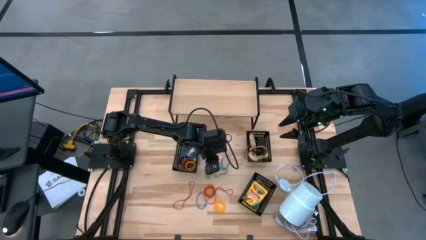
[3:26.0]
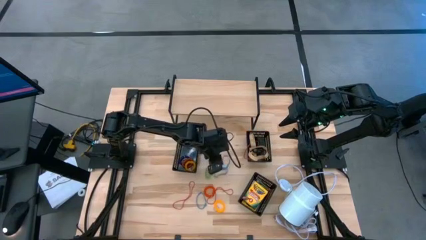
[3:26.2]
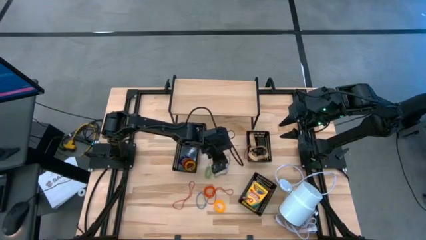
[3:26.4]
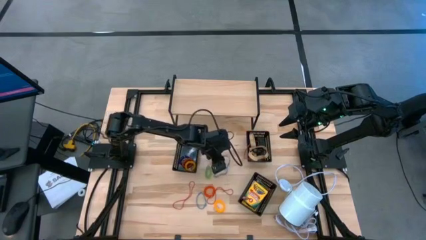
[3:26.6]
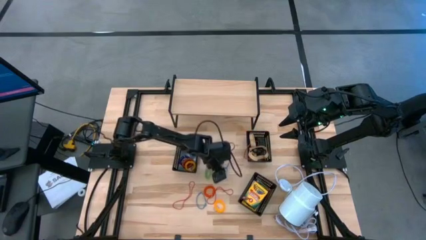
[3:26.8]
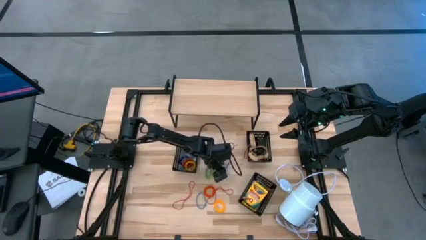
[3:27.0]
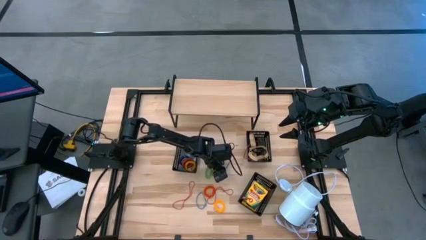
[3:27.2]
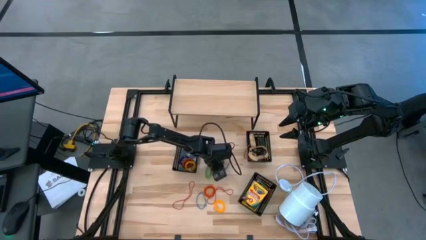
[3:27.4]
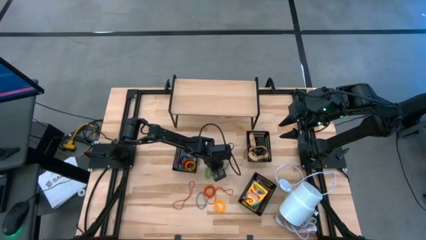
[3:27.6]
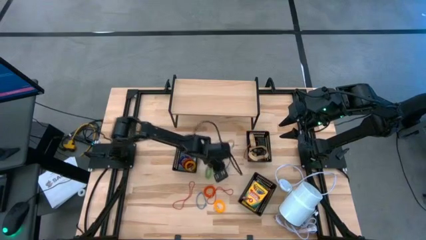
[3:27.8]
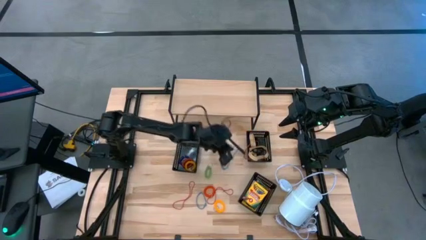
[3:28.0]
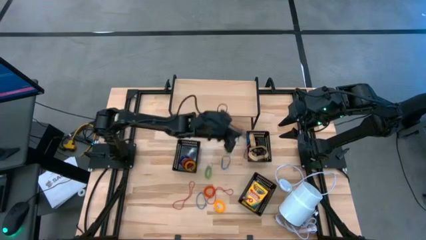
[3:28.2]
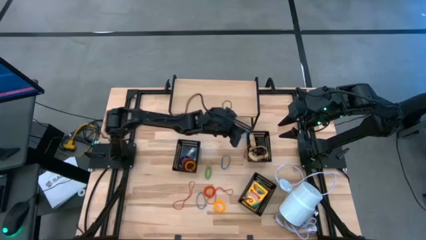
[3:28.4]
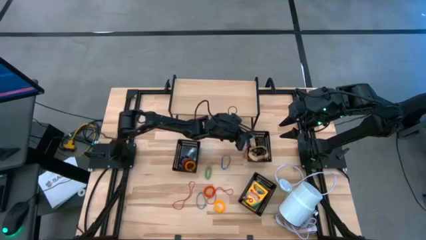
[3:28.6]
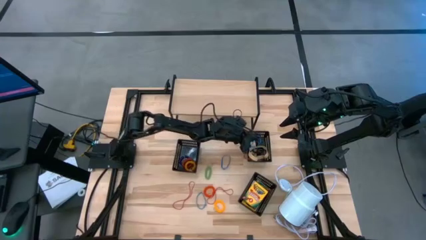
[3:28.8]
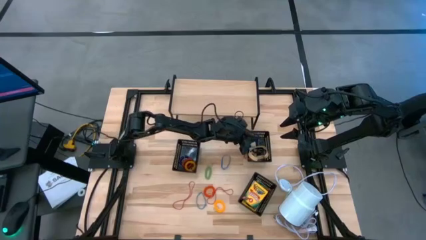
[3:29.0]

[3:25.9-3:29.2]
Task: Pick & Place Office Desk Supplies
Put the top blue rubber band into the top right black bin

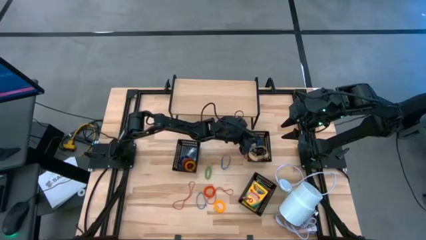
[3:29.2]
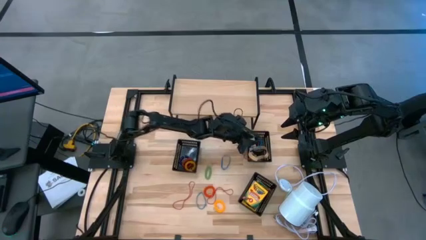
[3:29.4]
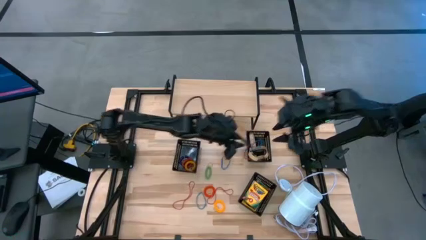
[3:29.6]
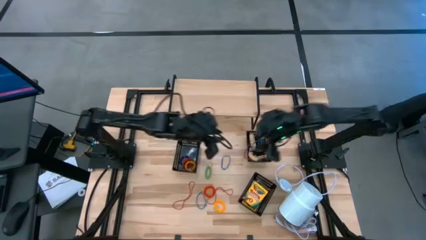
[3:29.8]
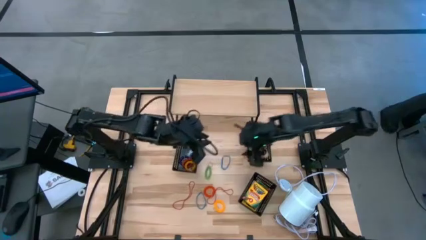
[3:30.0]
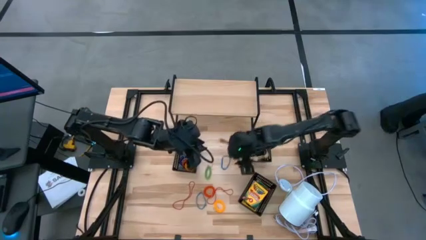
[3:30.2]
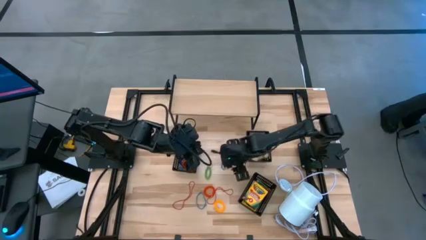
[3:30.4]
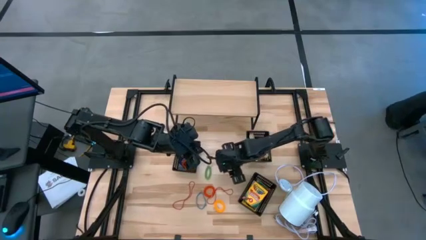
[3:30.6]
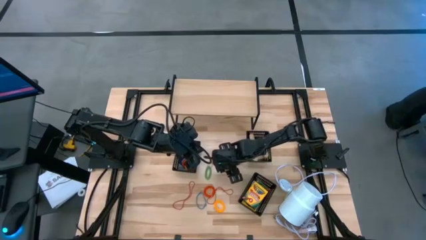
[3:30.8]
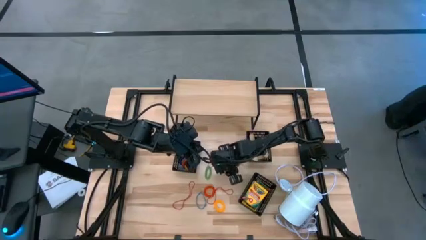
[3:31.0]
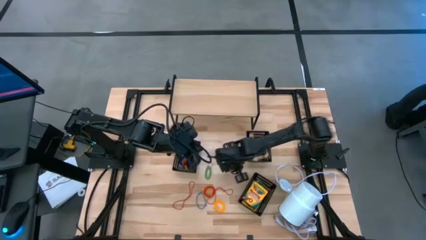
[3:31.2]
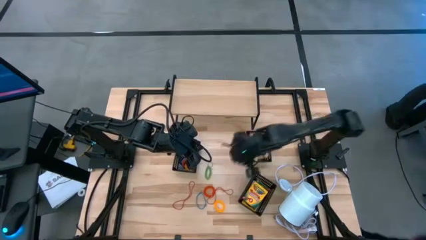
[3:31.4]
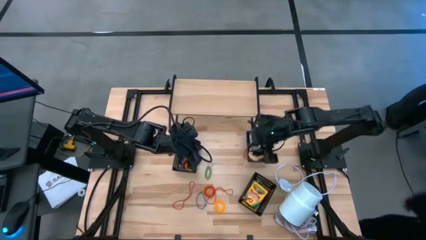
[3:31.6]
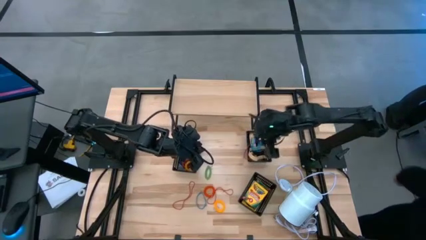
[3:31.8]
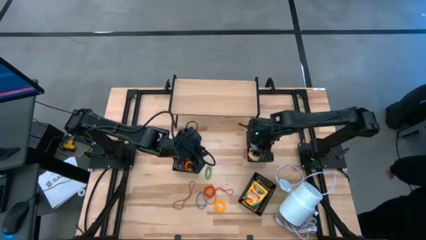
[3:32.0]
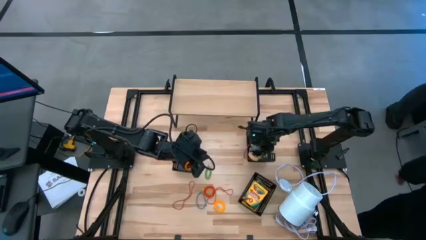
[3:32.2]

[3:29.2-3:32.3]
Put the top blue rubber band into the top right black bin

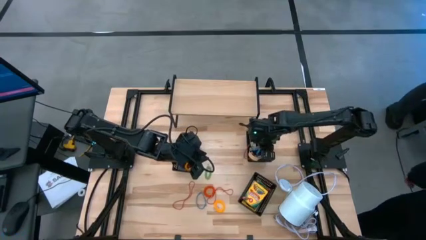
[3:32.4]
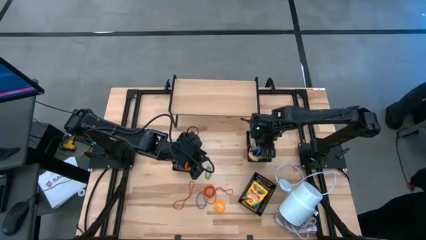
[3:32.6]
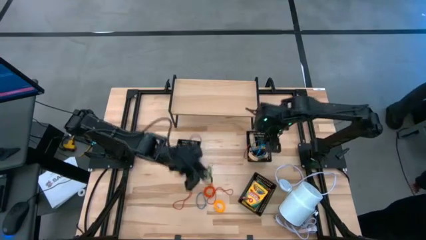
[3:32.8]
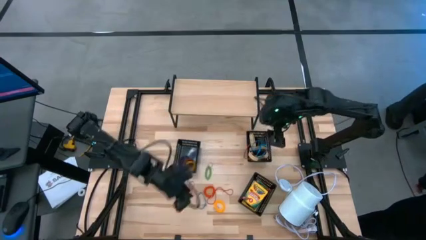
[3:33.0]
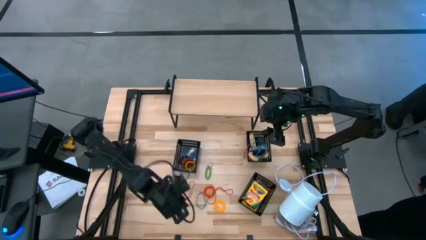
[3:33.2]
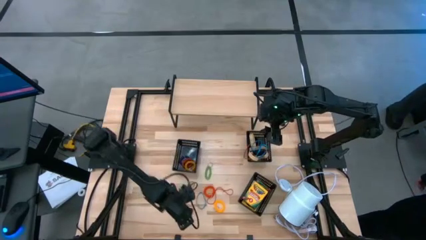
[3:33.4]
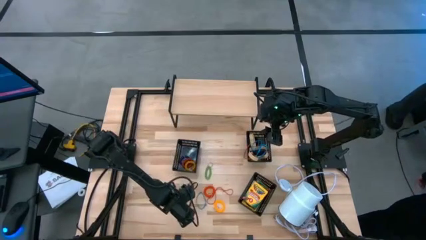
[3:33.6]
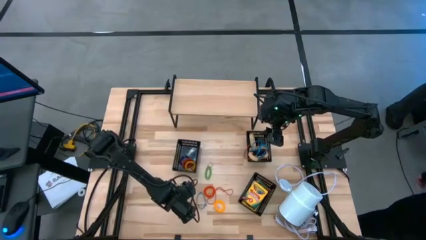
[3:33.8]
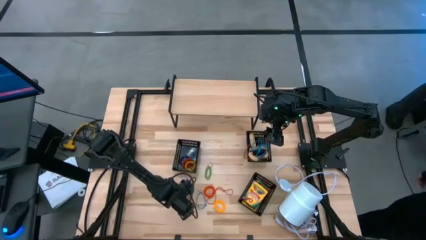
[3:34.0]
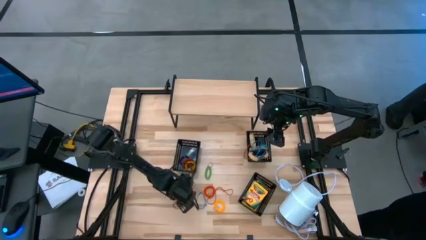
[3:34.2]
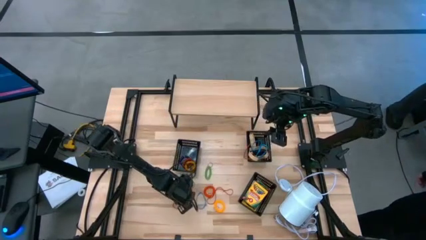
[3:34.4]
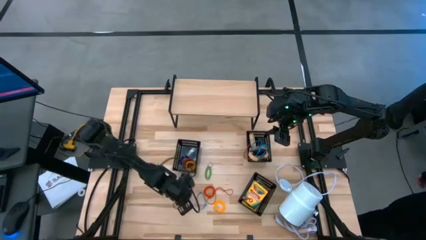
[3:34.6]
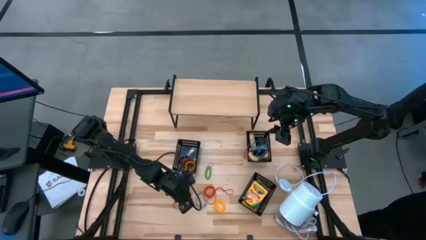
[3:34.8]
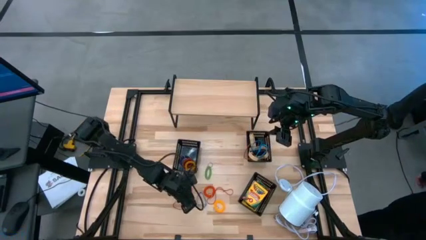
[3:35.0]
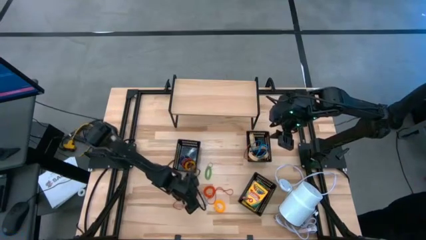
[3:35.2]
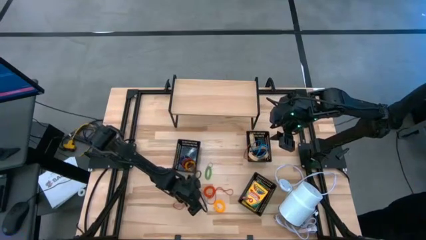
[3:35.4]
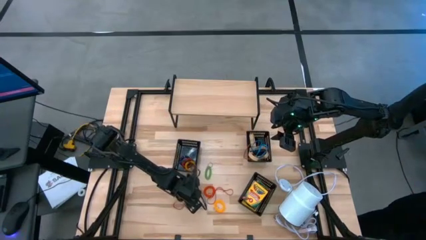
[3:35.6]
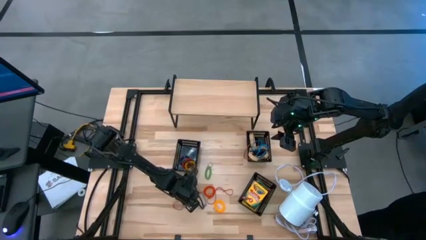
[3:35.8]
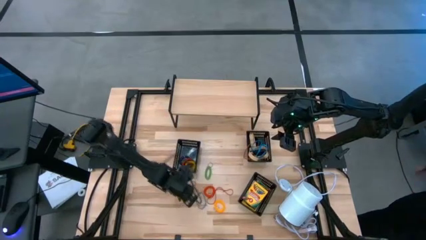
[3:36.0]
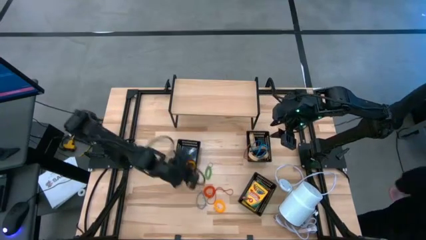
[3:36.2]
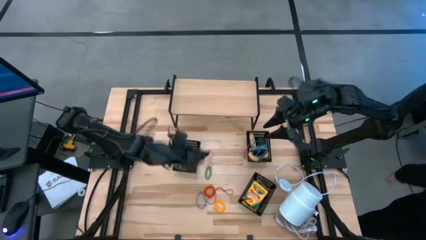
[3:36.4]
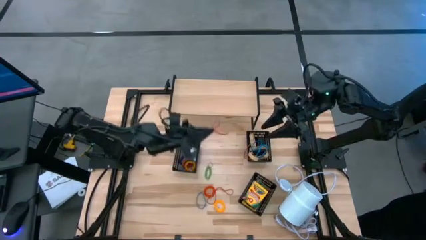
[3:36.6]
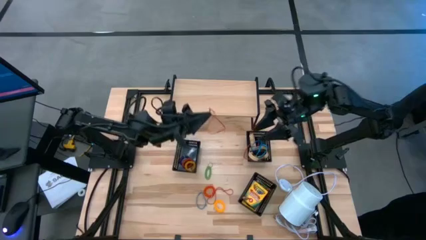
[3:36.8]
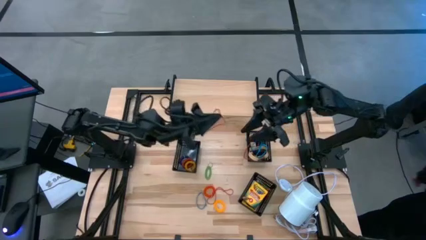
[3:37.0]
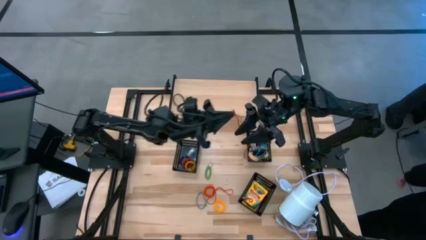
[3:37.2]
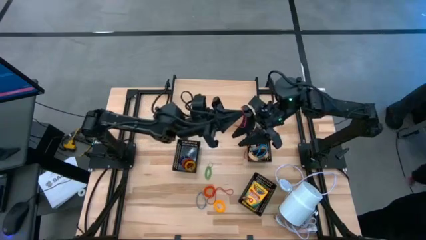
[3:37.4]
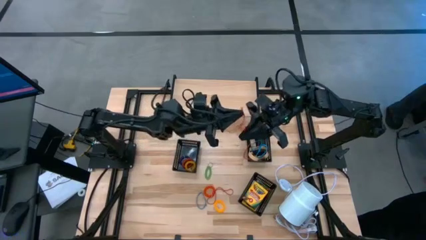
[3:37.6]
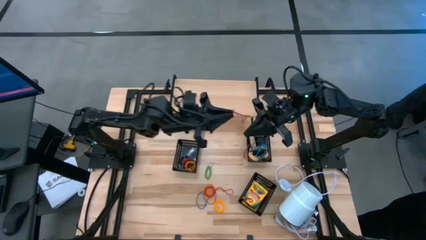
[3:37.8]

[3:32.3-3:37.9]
Put the left red rubber band into the top right black bin

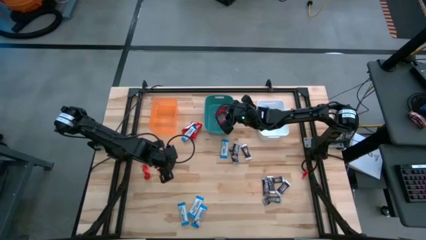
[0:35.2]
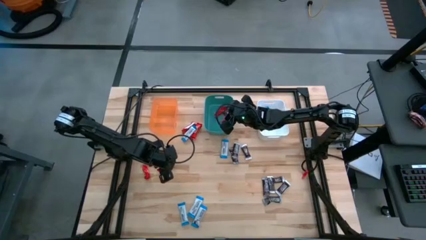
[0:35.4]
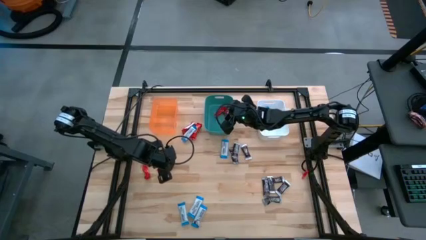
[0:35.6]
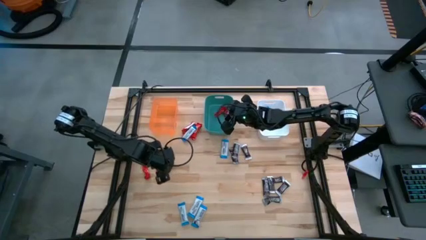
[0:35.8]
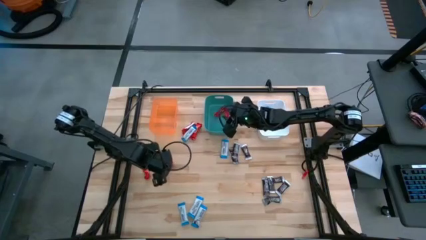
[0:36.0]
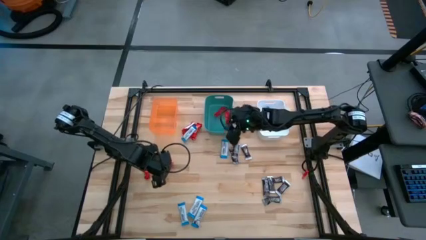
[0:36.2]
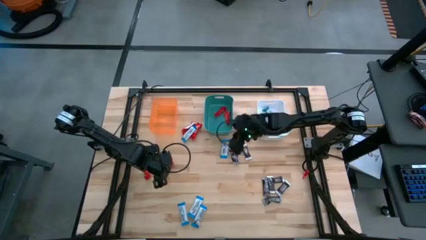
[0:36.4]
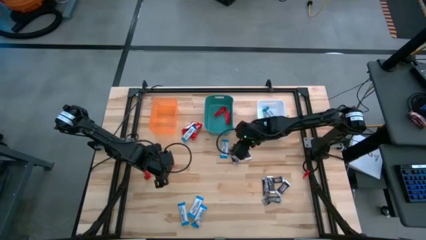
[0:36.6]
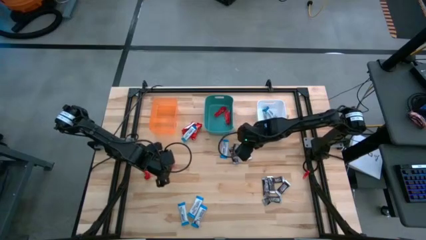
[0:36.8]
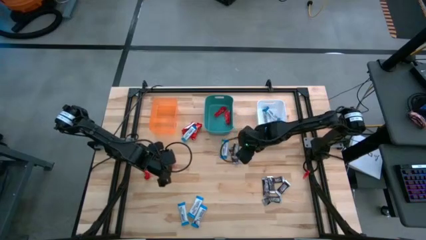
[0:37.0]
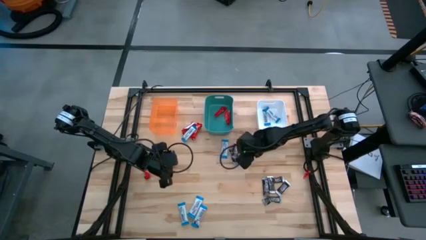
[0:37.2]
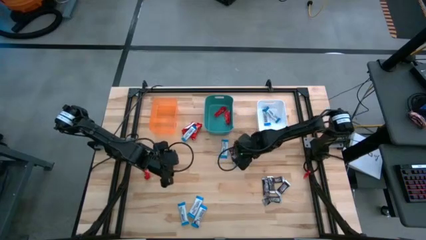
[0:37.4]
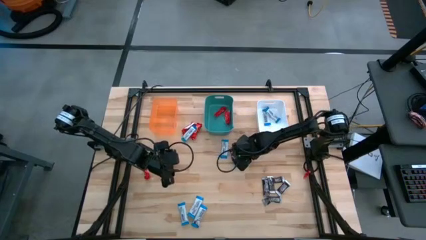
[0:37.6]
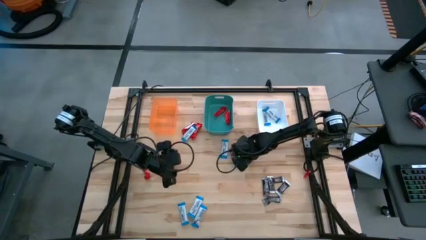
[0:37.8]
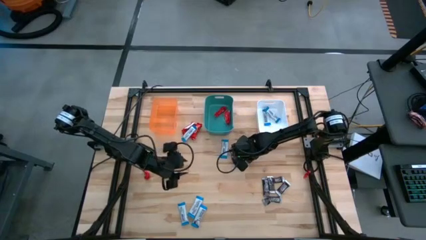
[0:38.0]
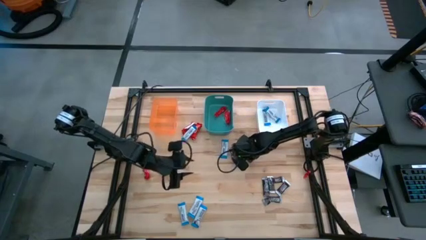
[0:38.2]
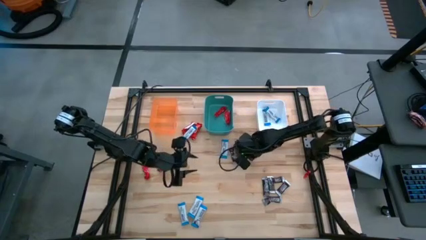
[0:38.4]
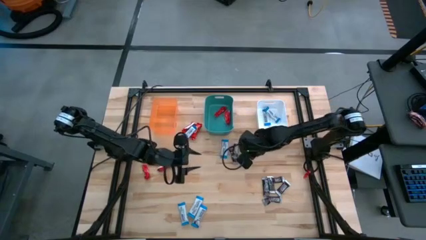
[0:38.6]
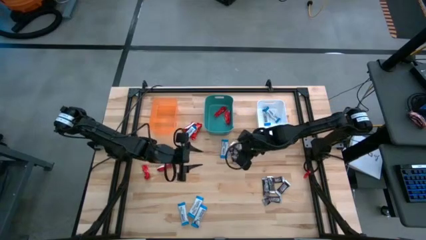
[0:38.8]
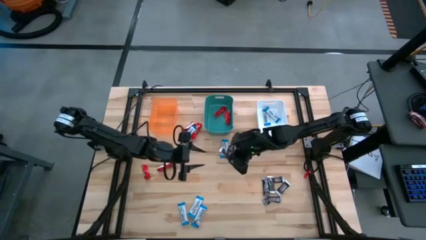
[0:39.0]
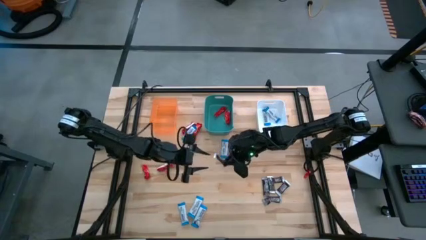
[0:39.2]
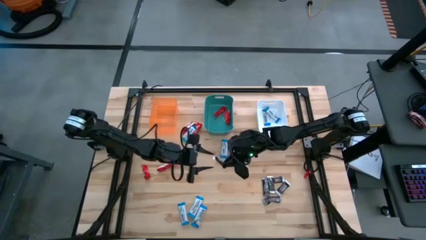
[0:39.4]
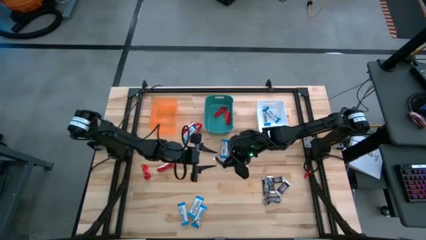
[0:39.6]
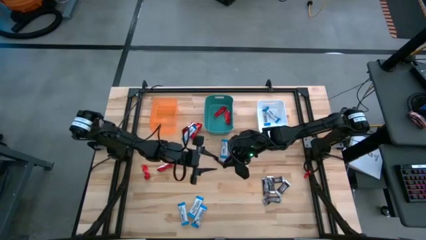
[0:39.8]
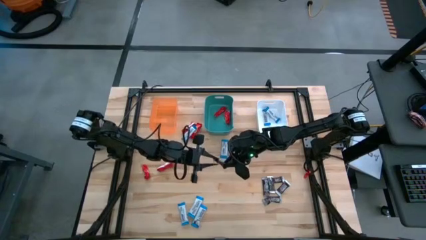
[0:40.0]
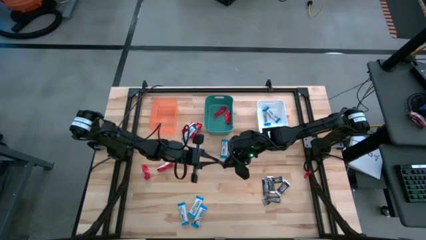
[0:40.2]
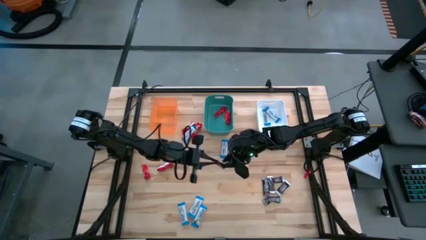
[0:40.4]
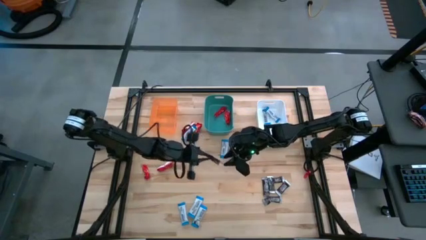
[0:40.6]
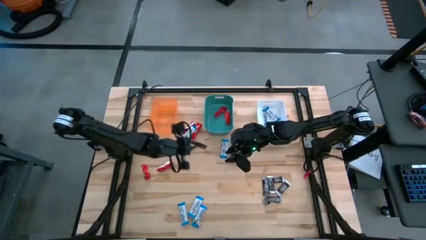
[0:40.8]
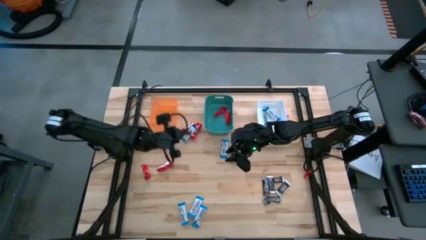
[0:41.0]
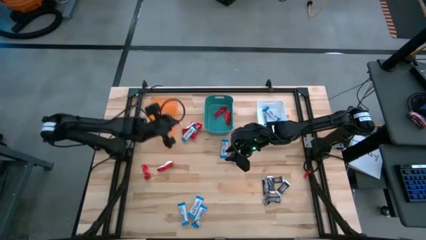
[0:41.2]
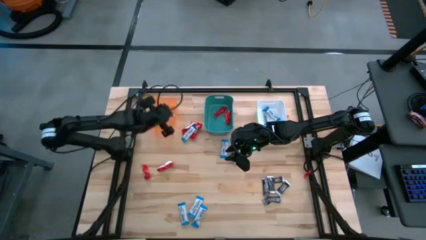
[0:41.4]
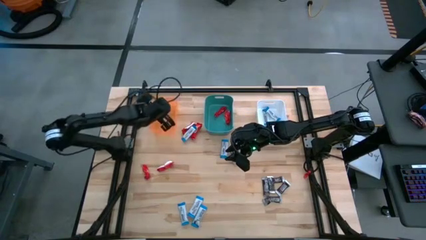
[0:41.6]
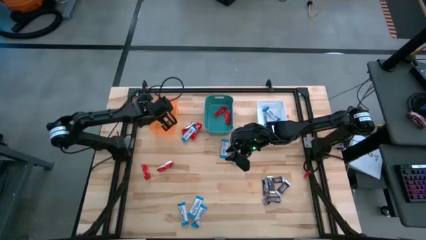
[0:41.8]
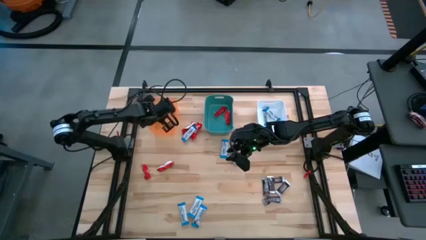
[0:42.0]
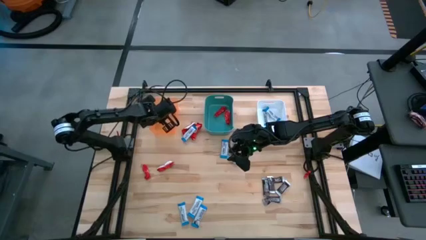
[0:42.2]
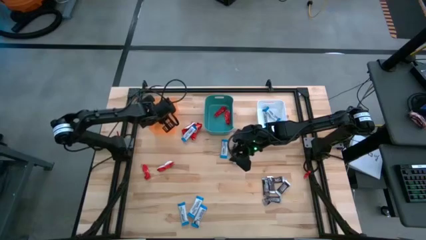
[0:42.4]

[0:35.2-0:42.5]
Task: Organize candy in baskets
Put the black chocolate bar into the orange bin
